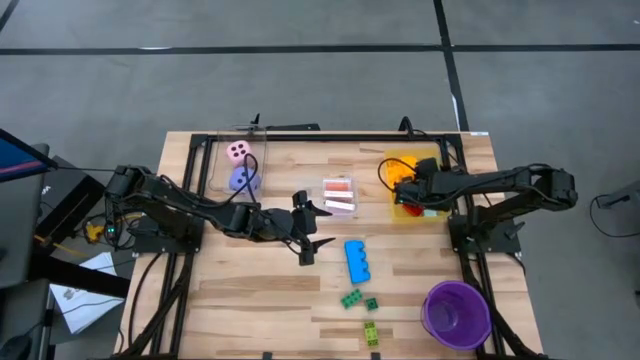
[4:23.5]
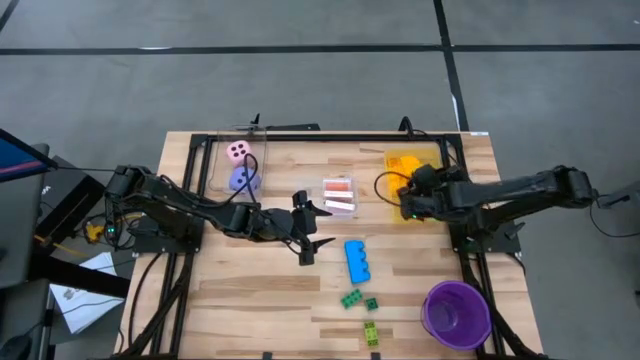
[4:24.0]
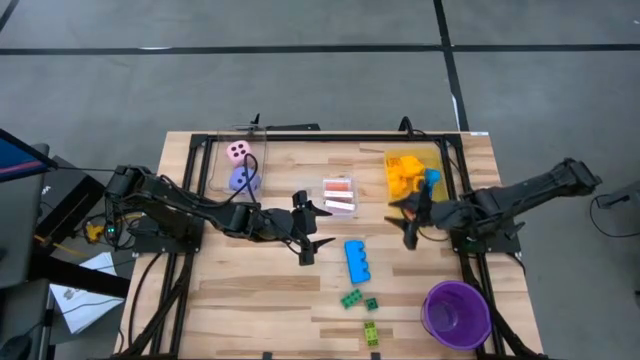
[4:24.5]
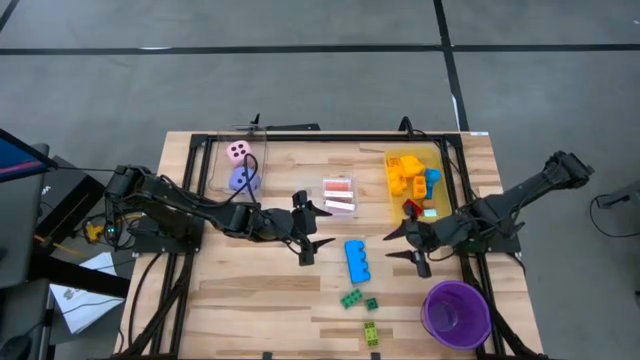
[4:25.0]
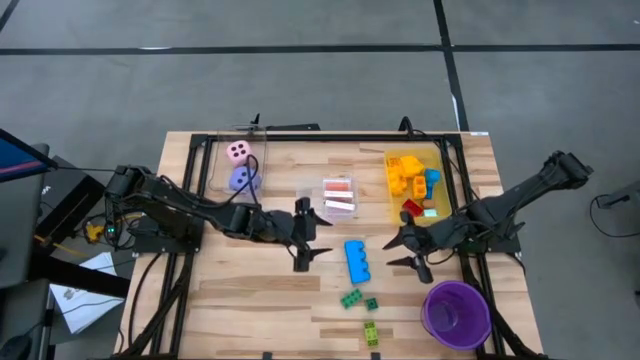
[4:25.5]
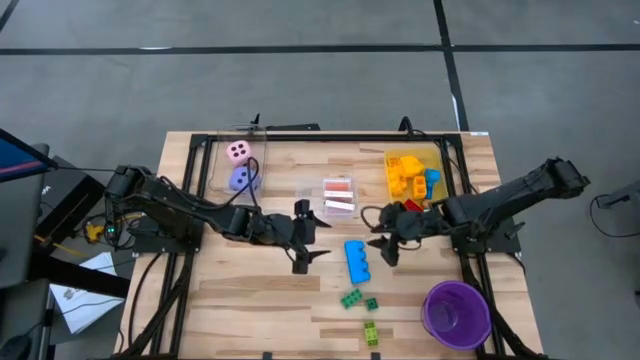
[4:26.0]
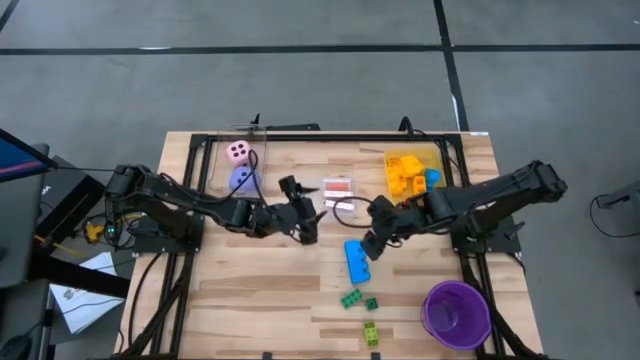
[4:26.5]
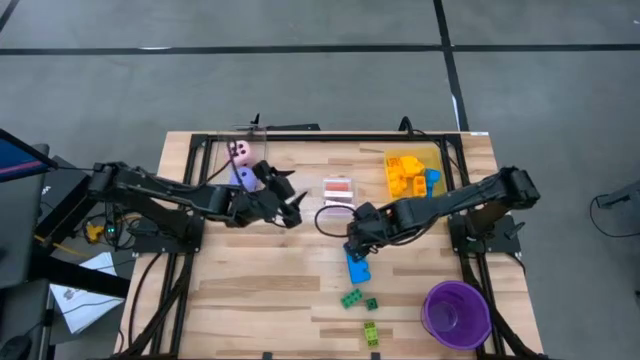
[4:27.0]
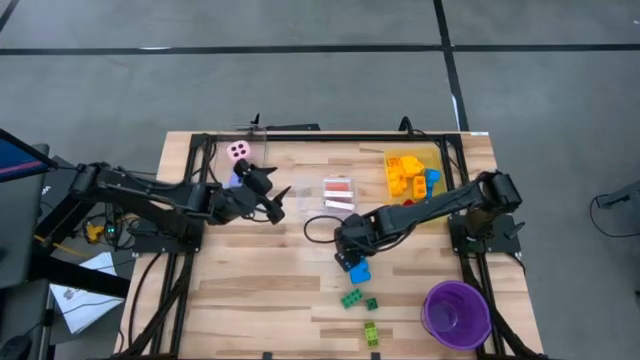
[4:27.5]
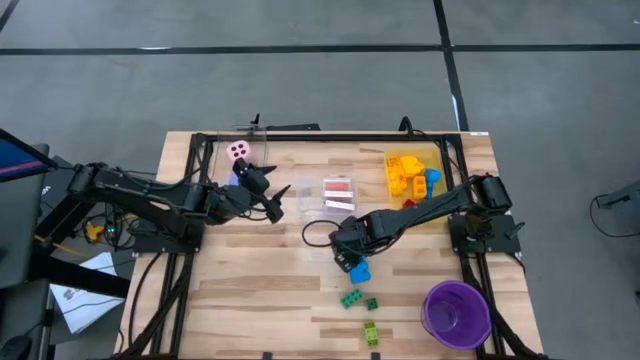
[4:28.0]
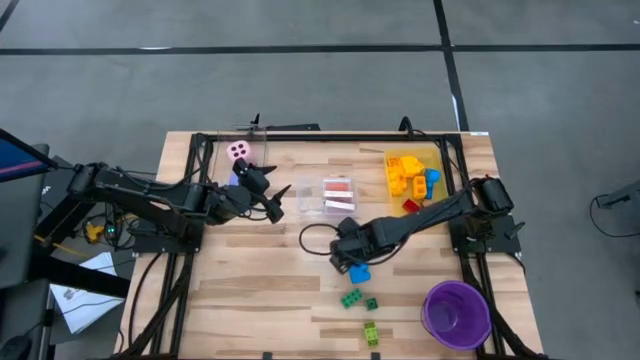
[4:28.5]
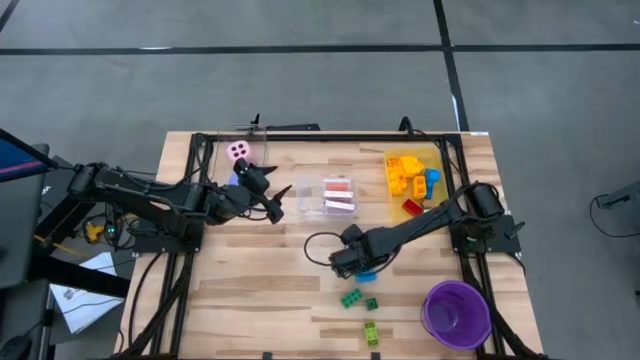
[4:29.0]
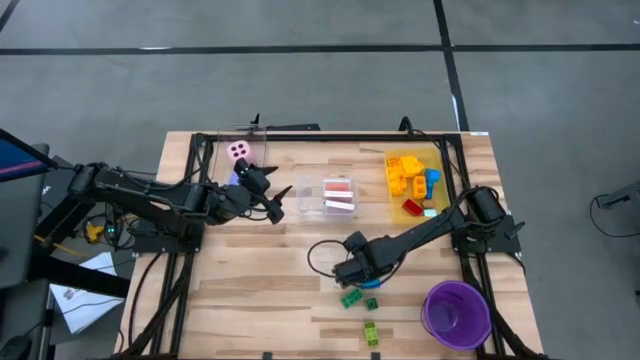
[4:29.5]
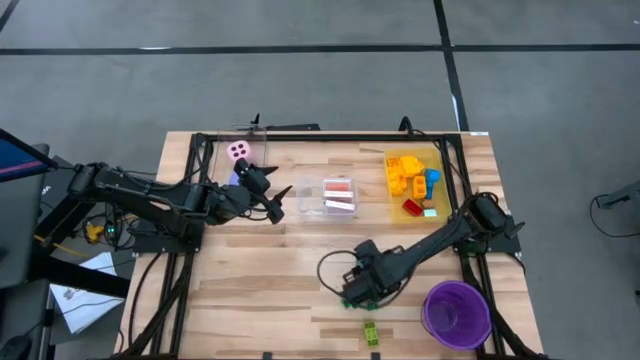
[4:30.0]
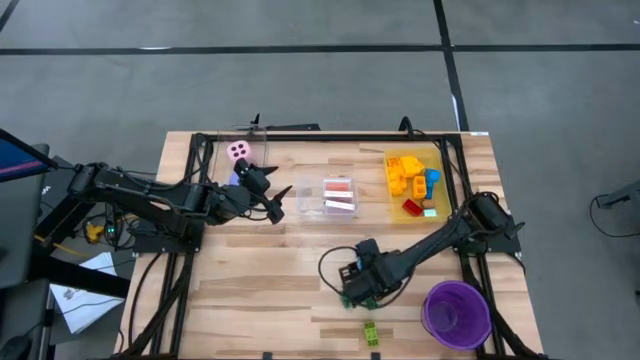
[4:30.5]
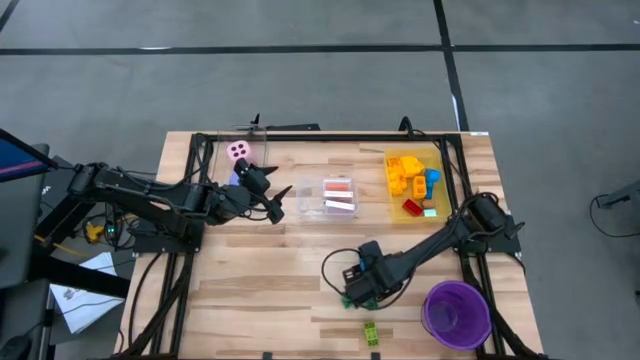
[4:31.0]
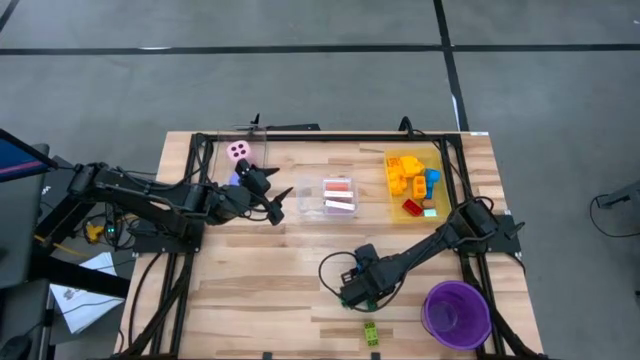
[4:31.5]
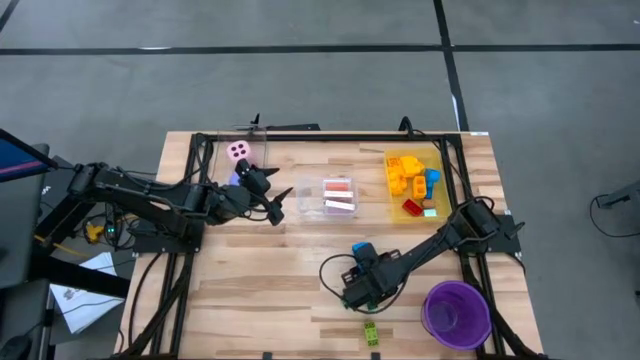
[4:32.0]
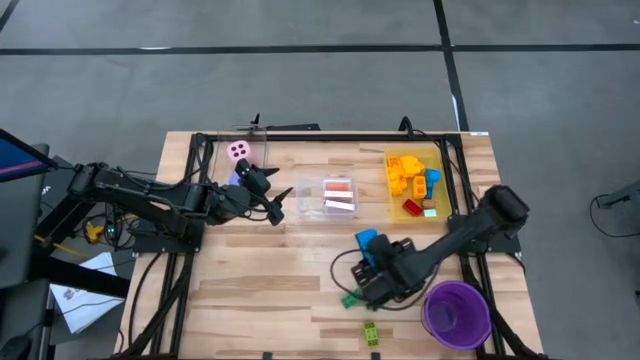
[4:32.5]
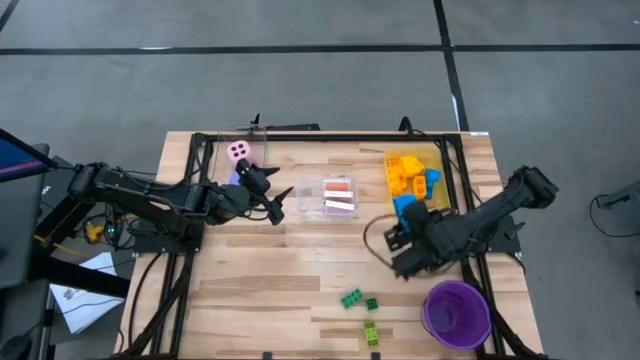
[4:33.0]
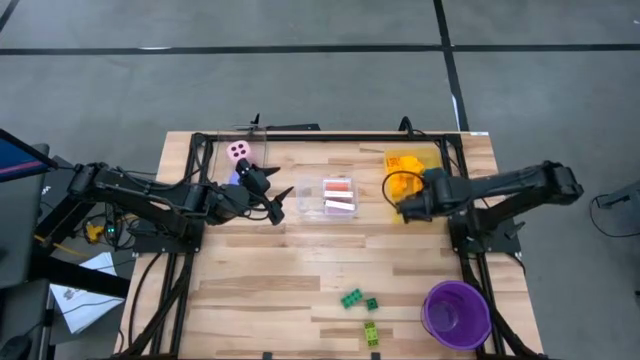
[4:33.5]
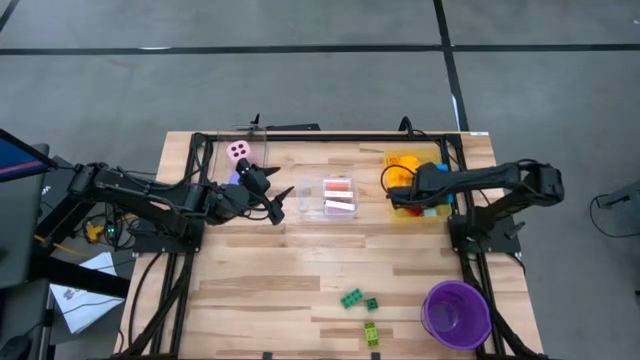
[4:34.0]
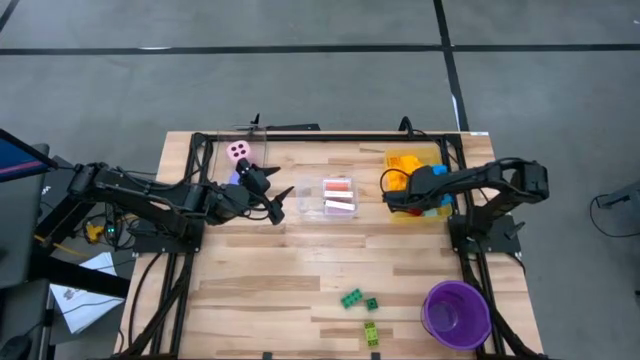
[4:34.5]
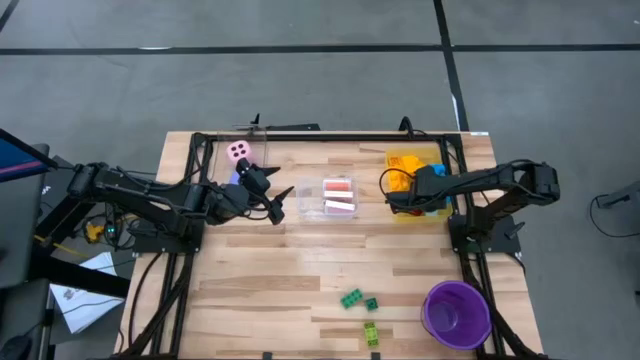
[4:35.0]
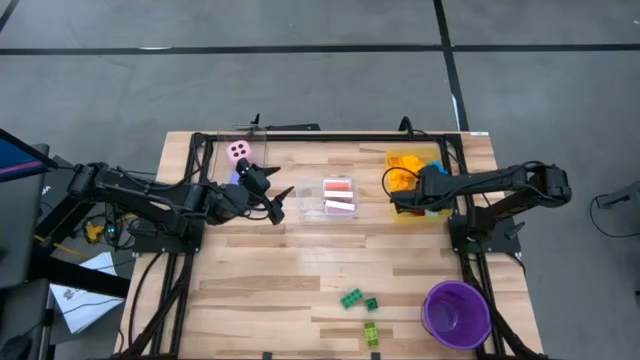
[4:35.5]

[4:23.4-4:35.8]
Task: Pick & Place Toys
Put the blue game piece into the yellow bin

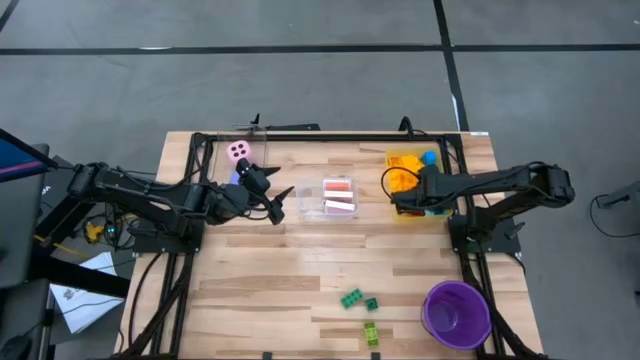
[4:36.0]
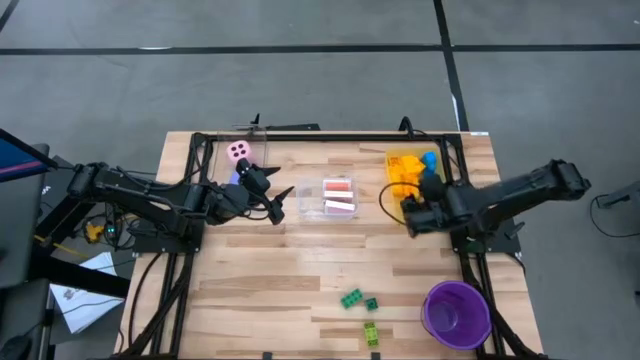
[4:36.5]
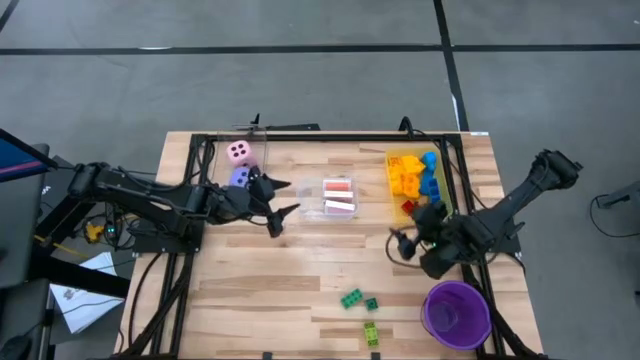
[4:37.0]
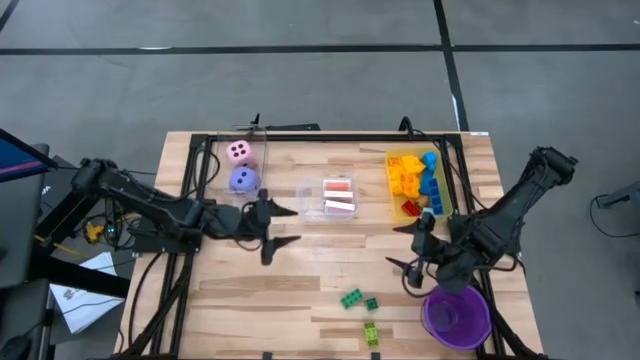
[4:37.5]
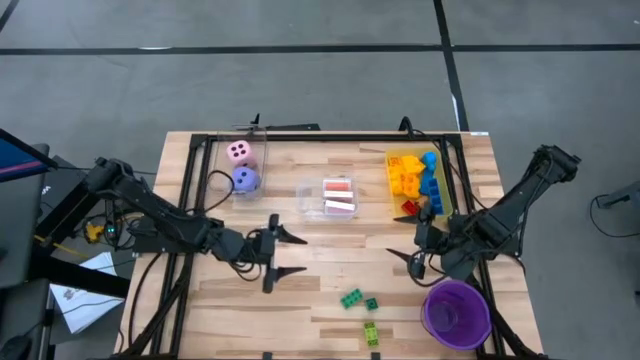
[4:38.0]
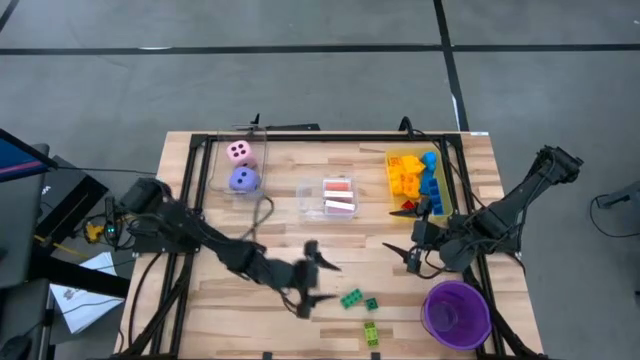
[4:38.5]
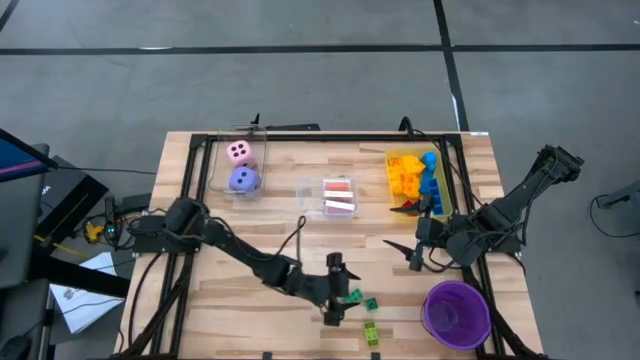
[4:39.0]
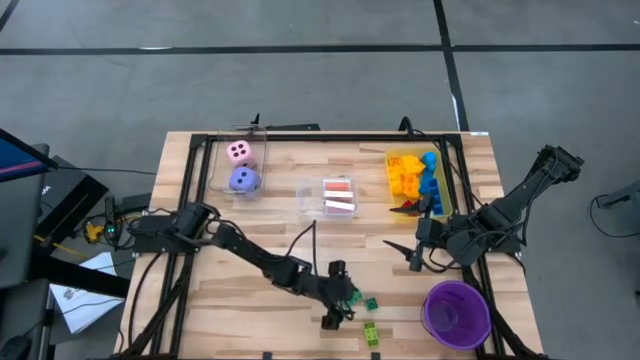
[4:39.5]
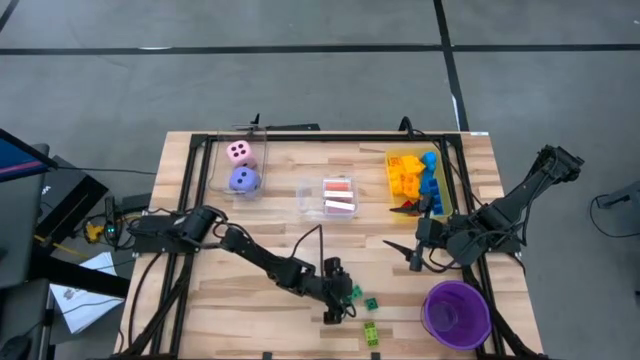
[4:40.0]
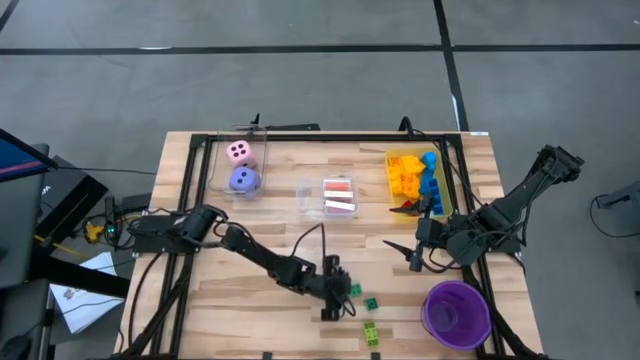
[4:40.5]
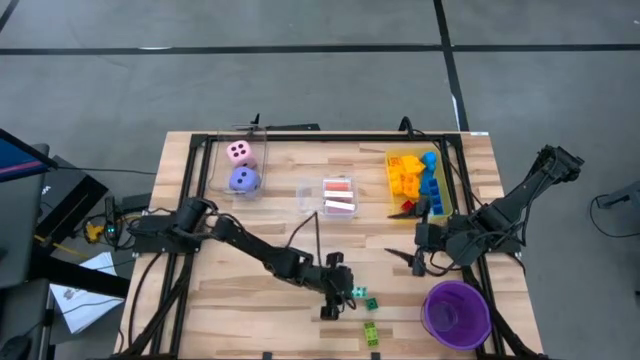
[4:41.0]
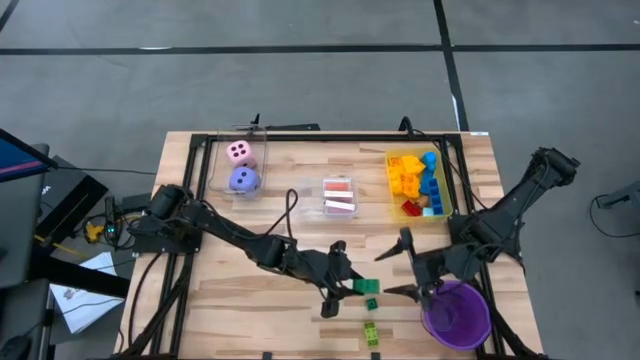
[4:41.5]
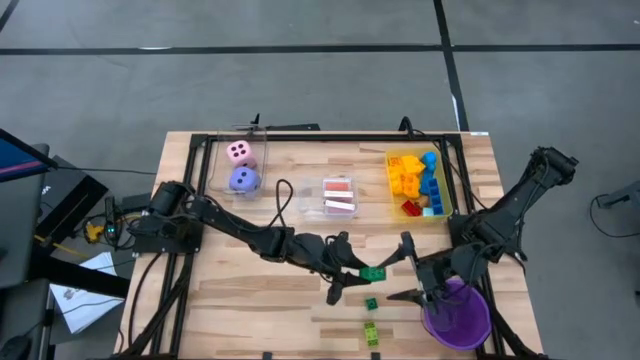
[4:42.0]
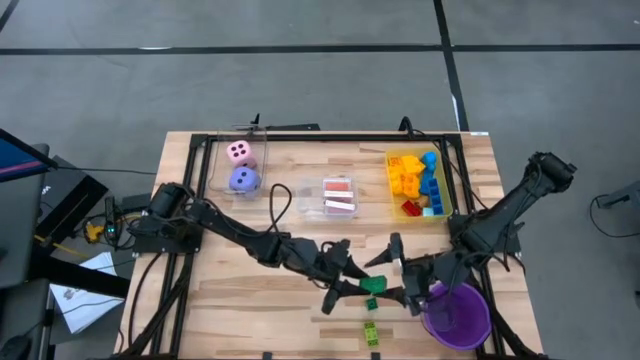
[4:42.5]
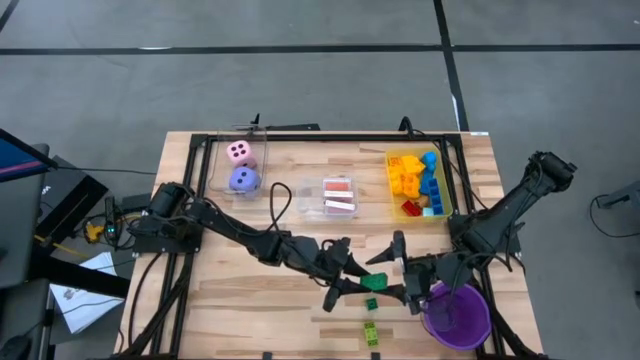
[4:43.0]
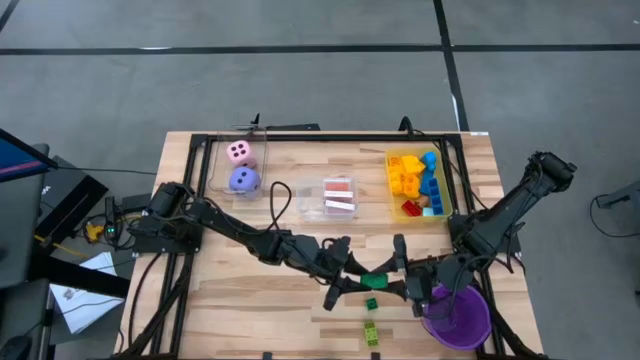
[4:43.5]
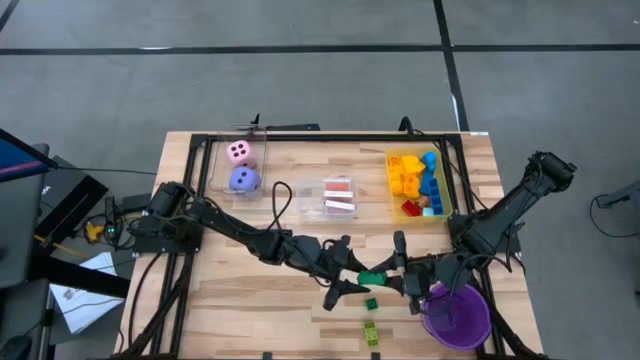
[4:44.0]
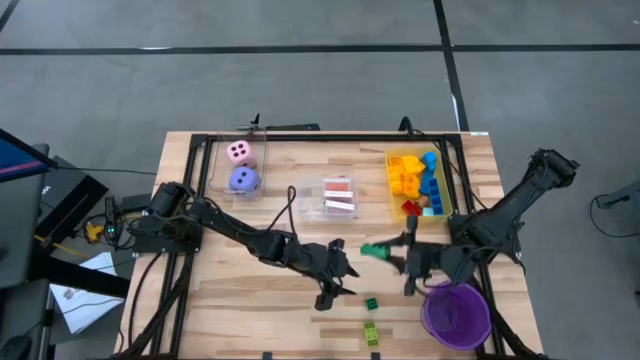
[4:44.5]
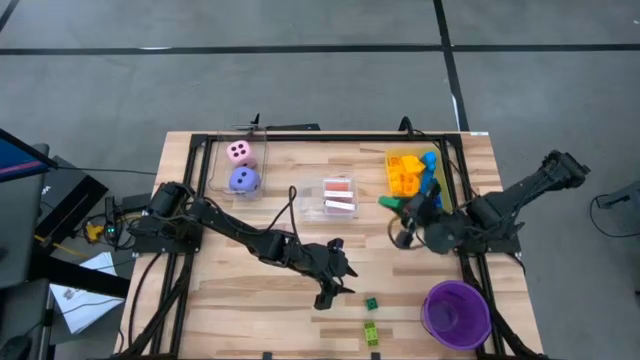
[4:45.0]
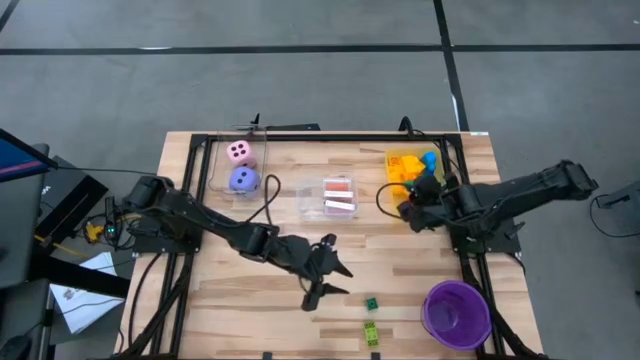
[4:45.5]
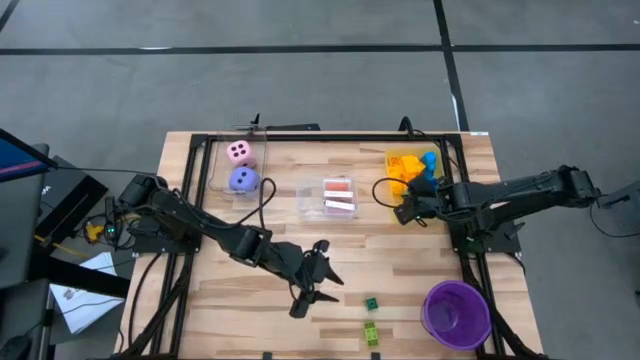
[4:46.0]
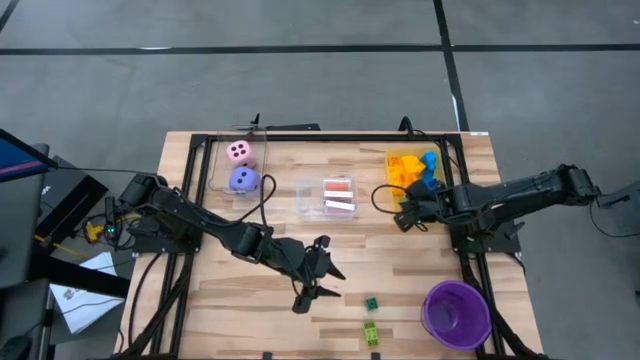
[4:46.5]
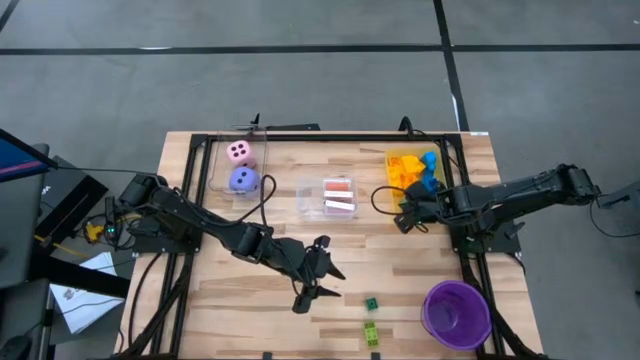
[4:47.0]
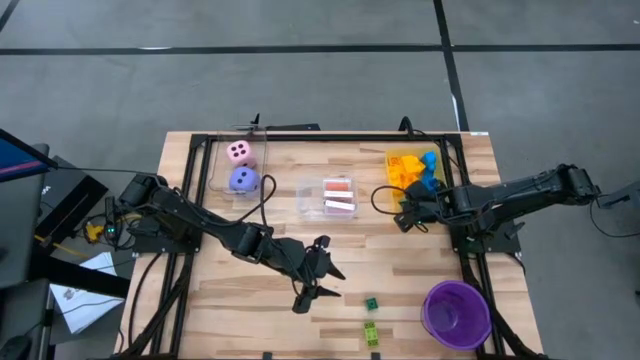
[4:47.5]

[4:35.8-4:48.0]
Put the green game piece into the yellow bin
